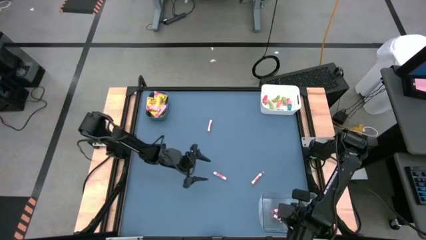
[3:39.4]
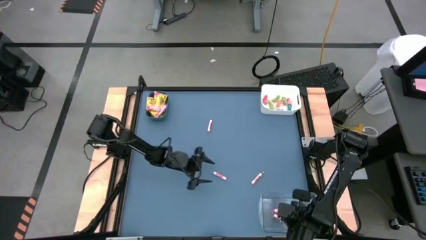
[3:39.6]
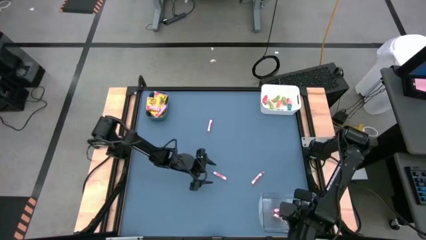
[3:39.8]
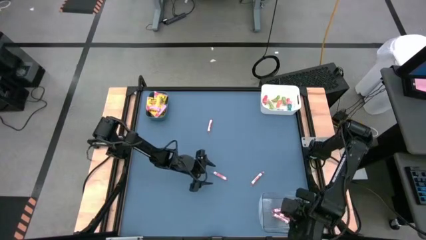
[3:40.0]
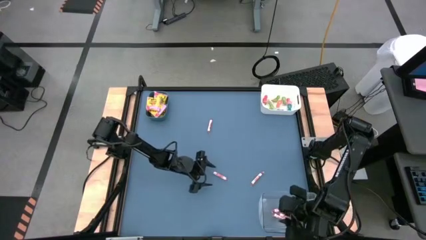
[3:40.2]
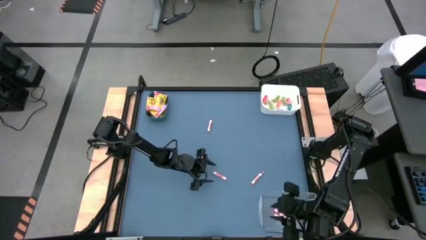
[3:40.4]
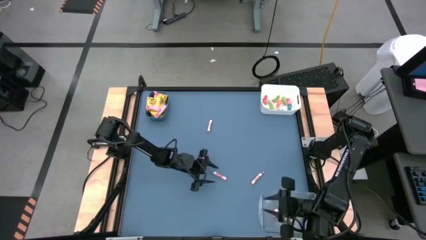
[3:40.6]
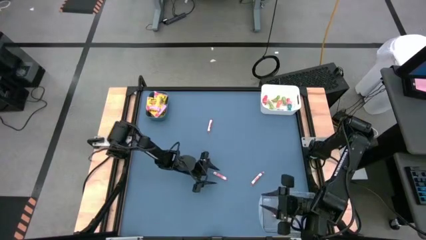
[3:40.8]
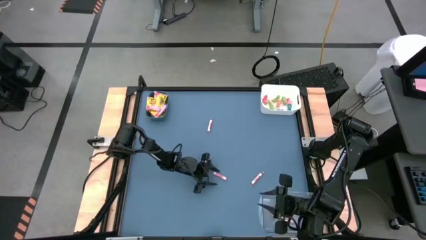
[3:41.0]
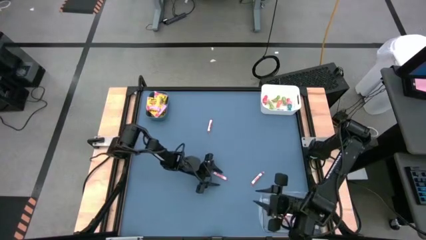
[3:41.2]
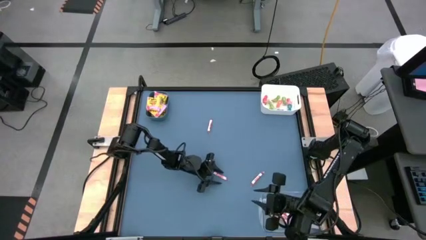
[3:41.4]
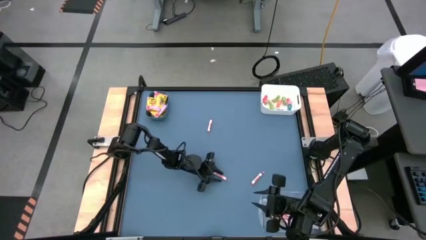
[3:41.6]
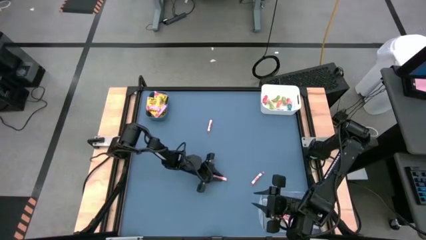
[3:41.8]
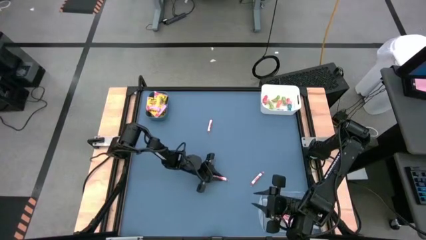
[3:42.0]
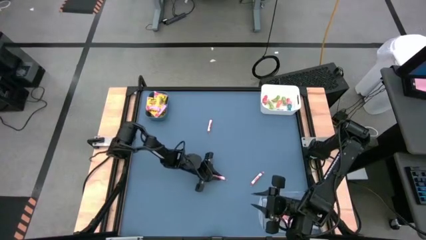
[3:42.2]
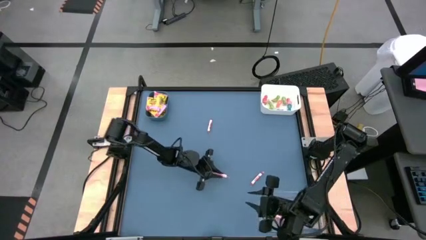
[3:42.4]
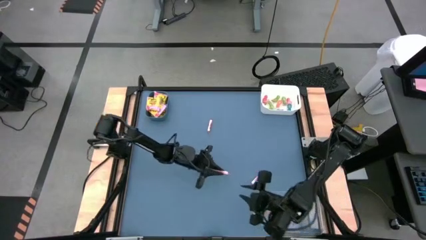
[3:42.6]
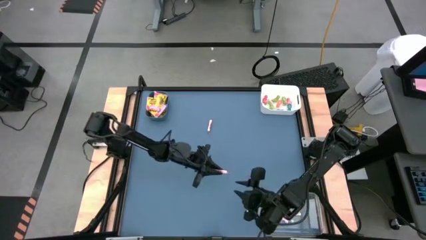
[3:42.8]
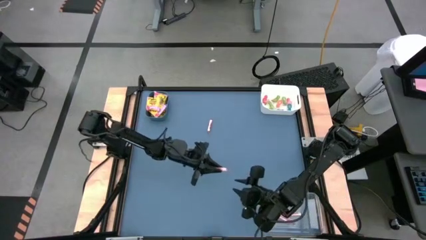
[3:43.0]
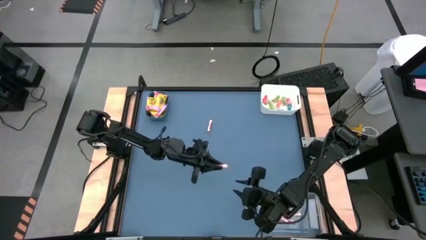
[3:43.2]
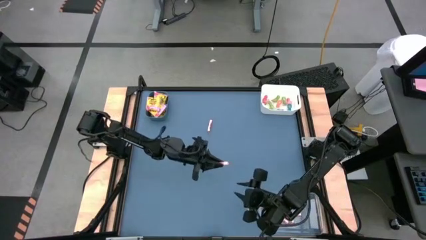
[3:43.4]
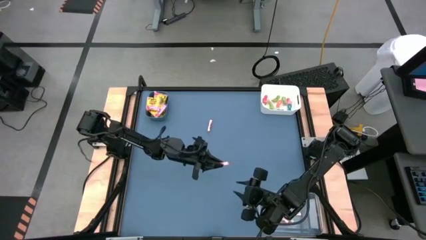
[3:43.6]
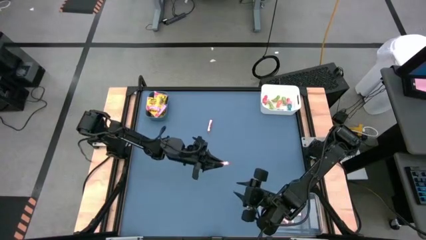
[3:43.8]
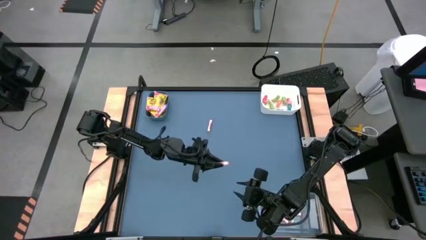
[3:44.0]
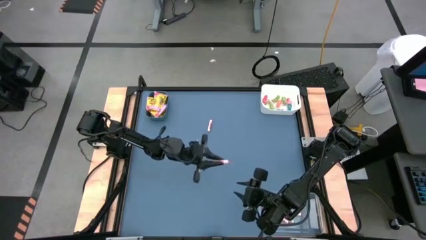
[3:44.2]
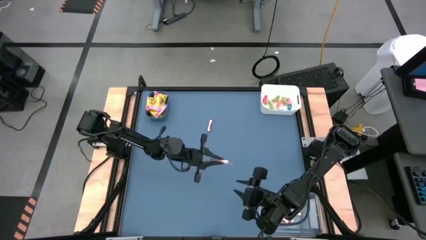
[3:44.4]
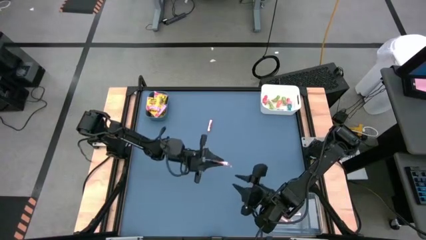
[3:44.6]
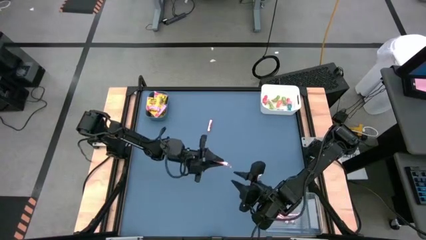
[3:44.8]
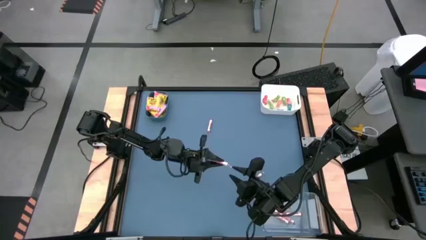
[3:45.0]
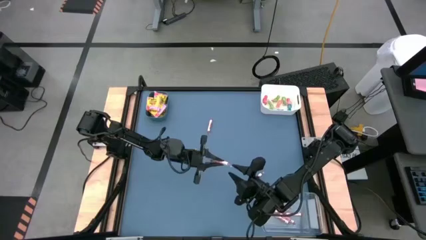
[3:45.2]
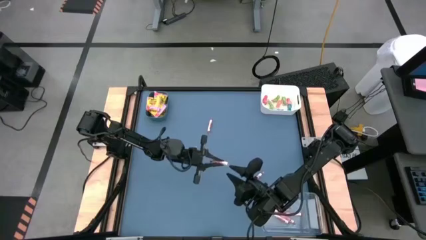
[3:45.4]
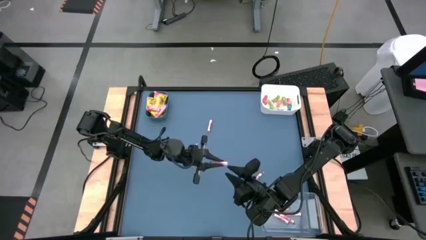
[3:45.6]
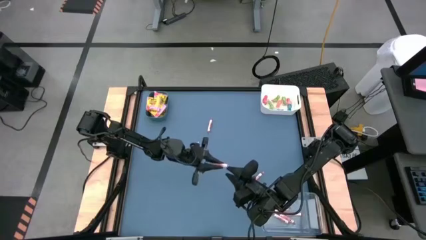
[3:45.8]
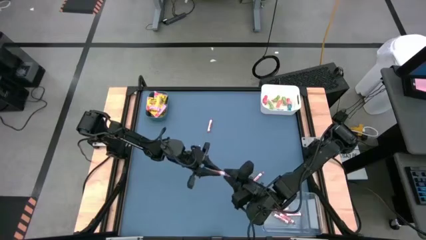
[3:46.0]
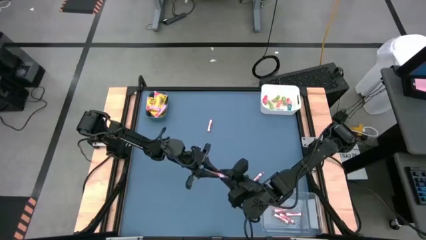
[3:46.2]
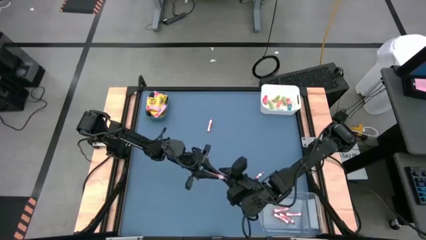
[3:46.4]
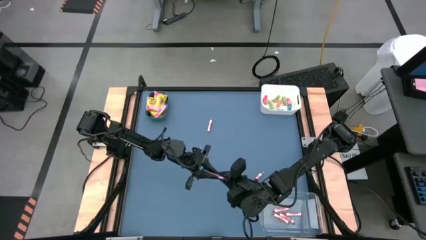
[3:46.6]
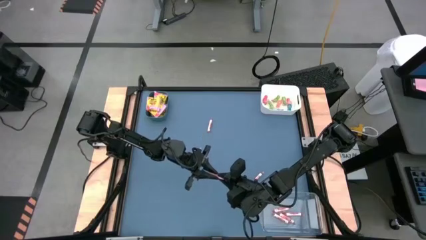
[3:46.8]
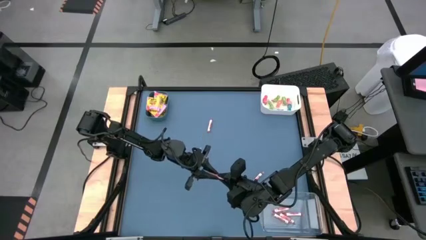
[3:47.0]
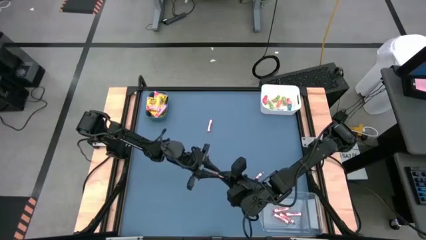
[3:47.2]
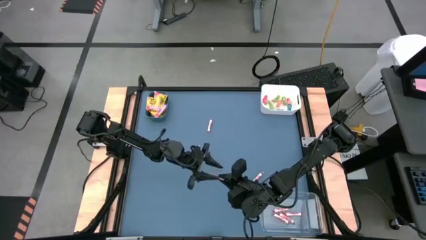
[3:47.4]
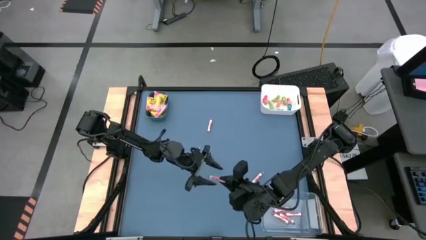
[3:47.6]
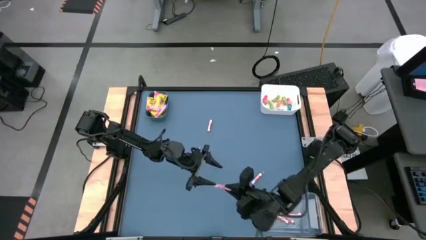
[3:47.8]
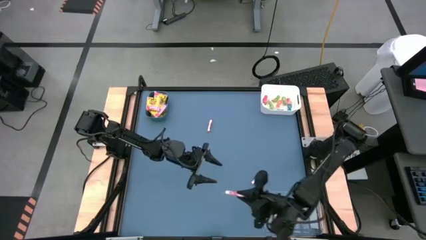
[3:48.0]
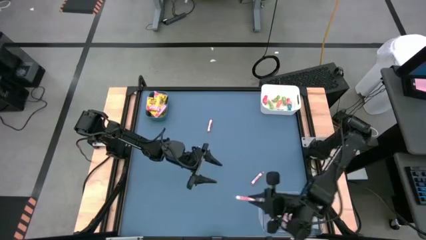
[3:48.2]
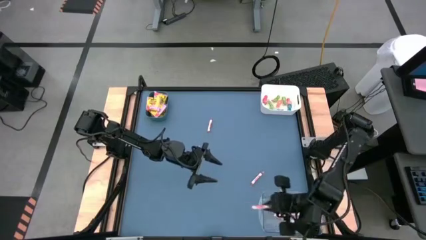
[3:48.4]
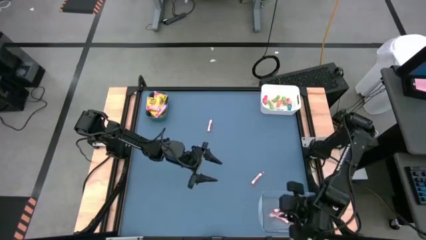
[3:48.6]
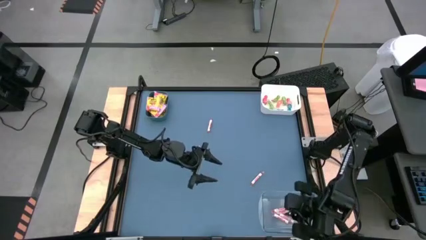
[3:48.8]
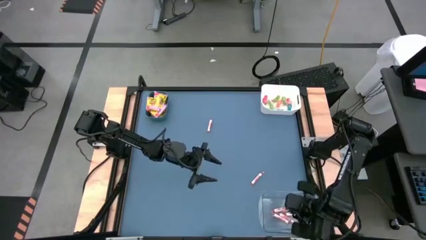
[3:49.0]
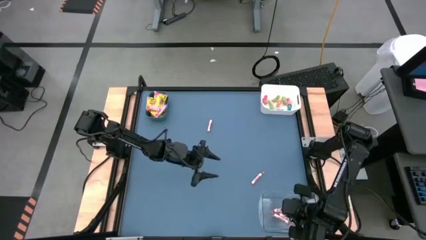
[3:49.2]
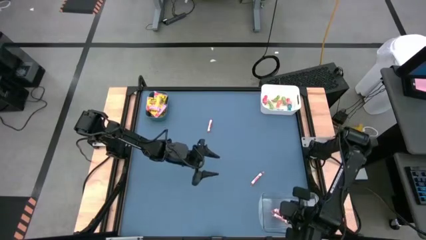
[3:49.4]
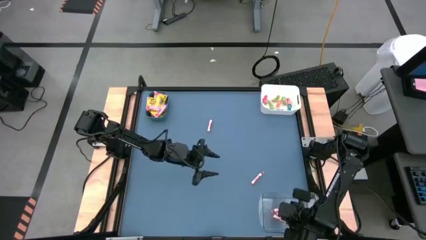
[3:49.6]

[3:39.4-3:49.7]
Task: Sort candy
Put the white candy into the transparent bin
